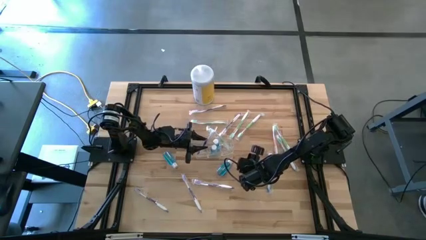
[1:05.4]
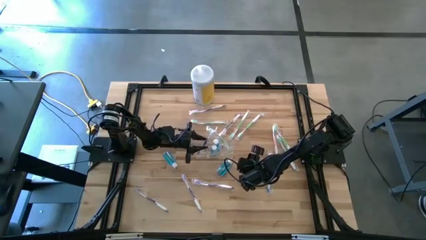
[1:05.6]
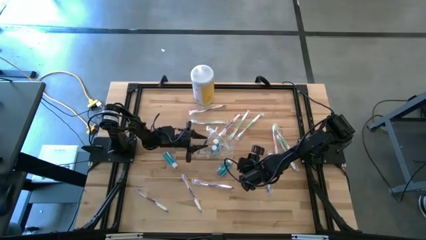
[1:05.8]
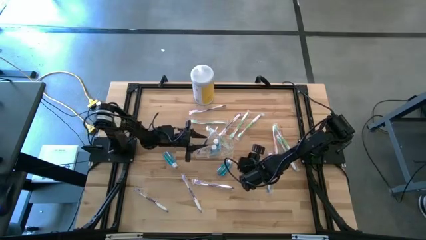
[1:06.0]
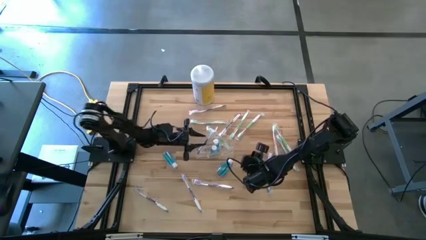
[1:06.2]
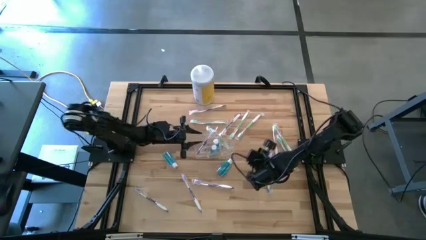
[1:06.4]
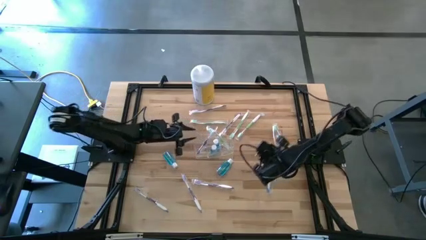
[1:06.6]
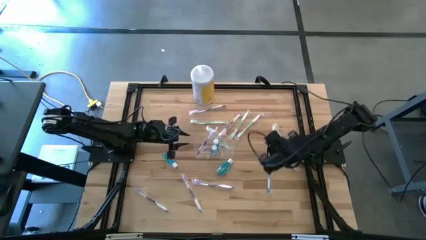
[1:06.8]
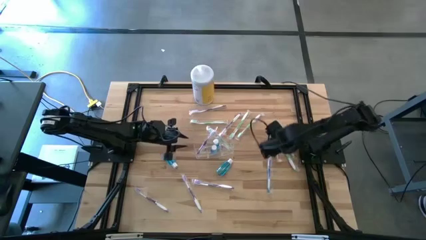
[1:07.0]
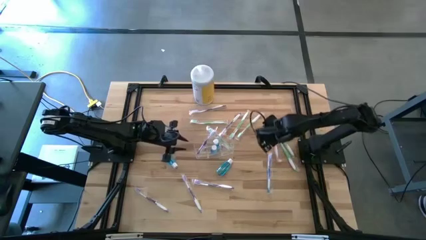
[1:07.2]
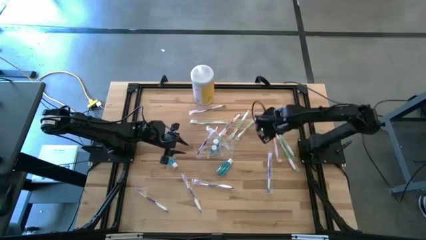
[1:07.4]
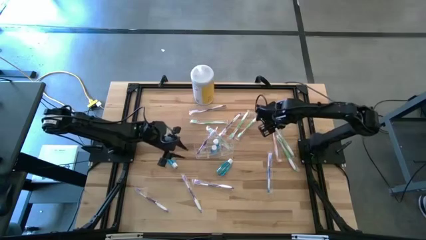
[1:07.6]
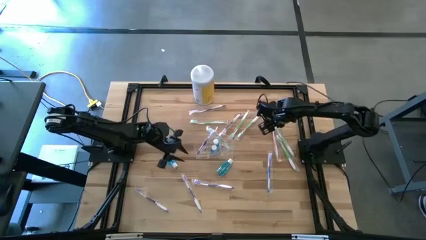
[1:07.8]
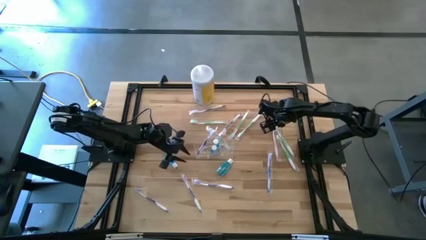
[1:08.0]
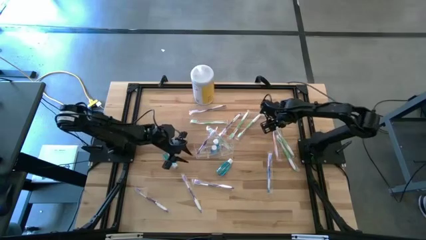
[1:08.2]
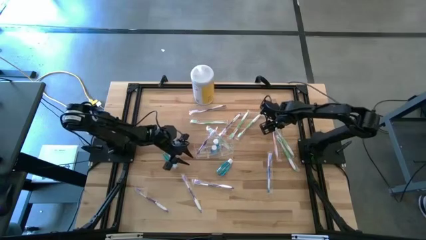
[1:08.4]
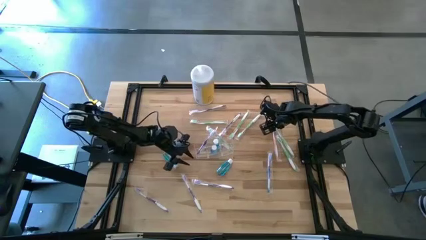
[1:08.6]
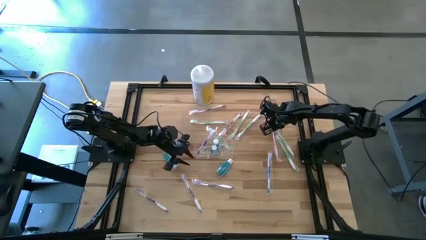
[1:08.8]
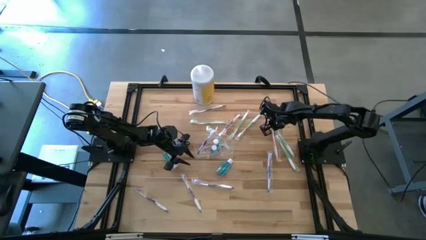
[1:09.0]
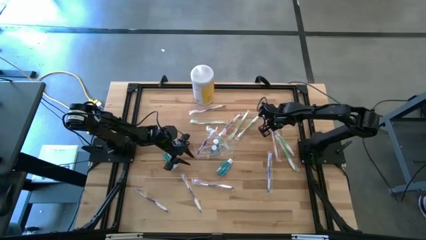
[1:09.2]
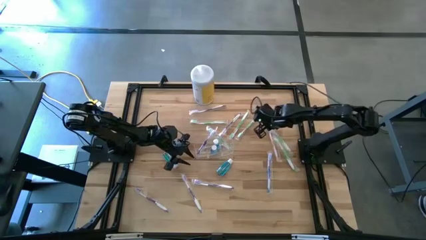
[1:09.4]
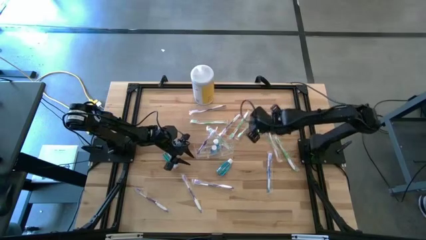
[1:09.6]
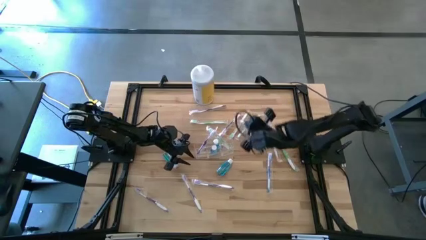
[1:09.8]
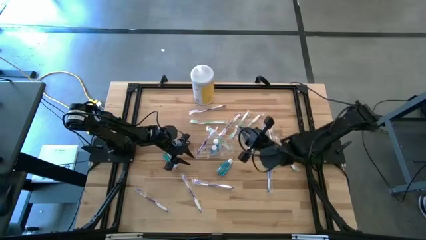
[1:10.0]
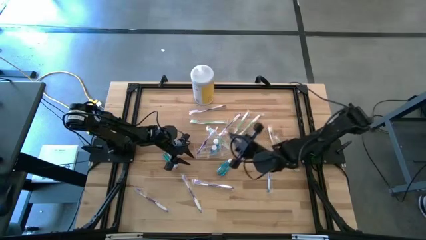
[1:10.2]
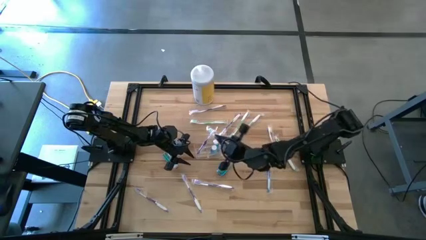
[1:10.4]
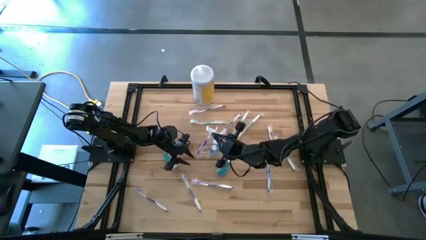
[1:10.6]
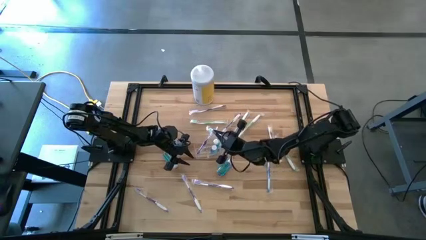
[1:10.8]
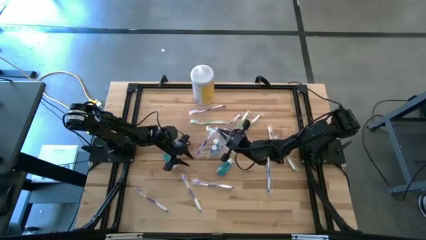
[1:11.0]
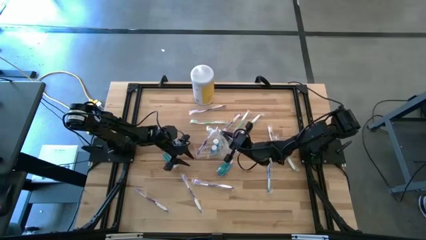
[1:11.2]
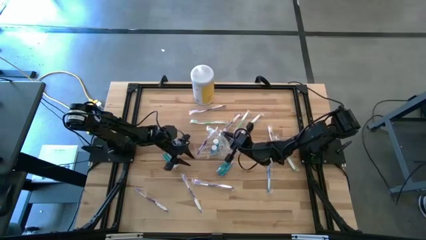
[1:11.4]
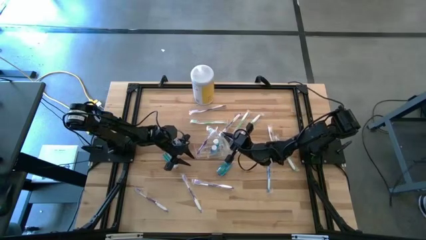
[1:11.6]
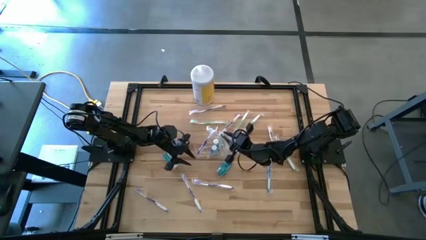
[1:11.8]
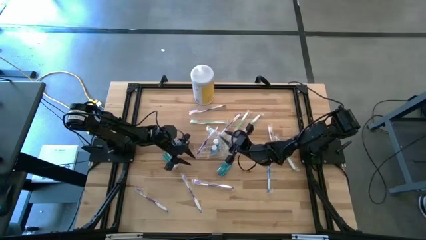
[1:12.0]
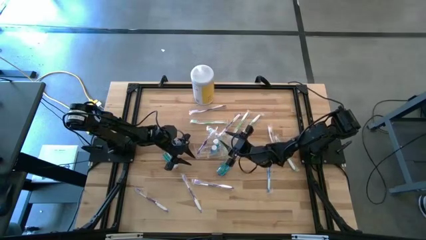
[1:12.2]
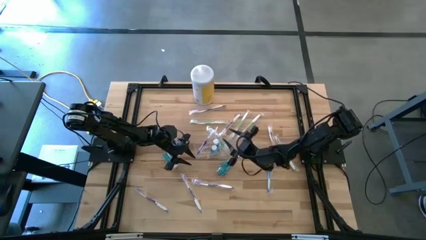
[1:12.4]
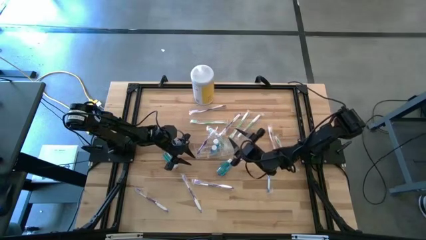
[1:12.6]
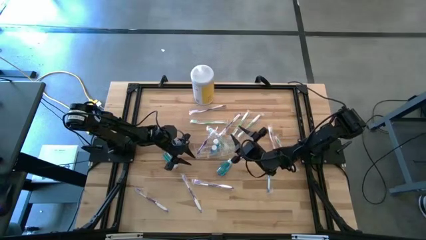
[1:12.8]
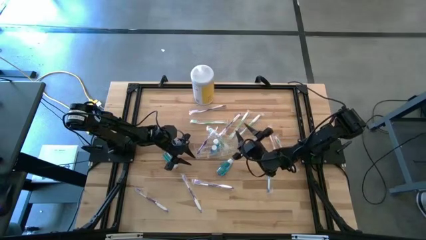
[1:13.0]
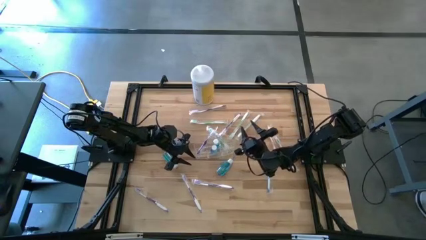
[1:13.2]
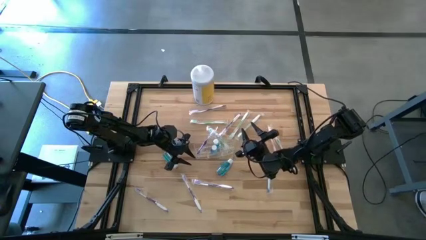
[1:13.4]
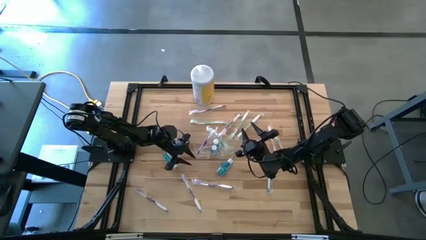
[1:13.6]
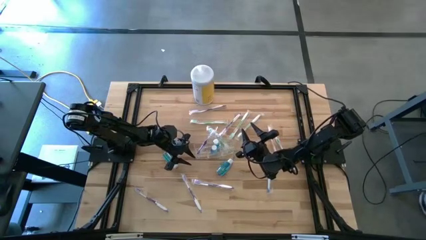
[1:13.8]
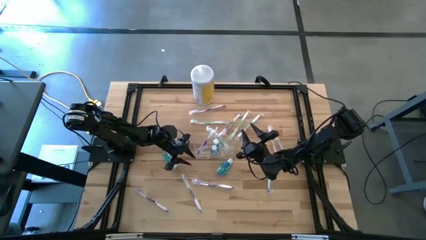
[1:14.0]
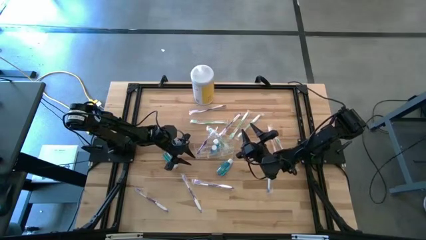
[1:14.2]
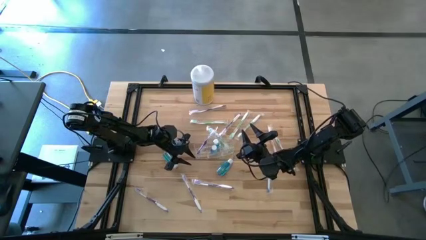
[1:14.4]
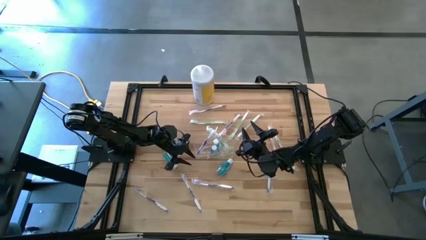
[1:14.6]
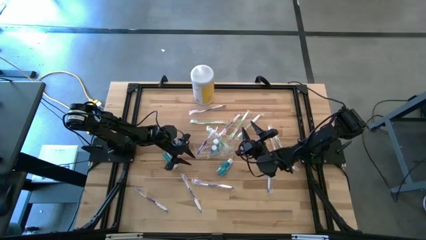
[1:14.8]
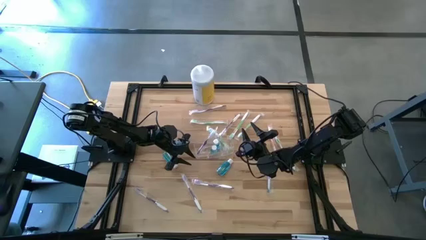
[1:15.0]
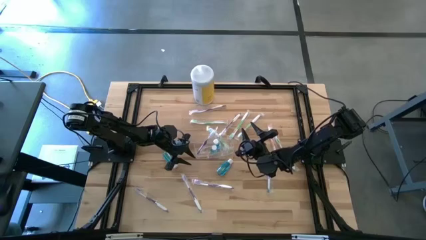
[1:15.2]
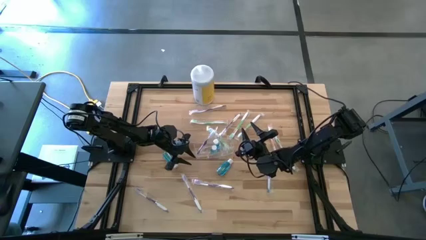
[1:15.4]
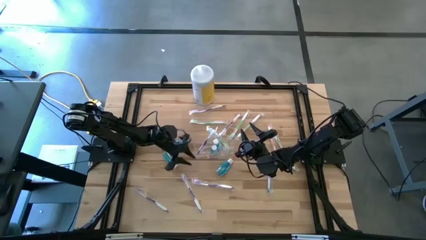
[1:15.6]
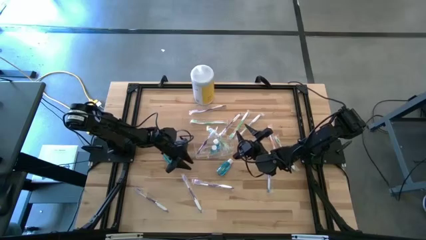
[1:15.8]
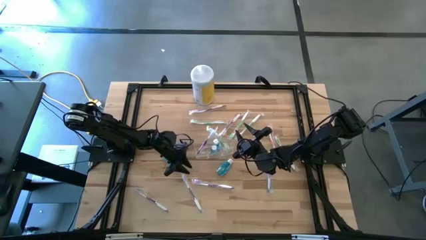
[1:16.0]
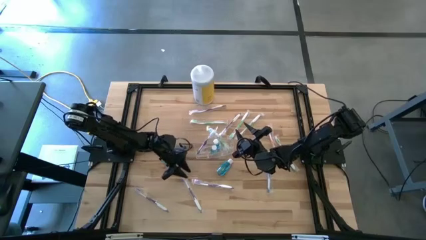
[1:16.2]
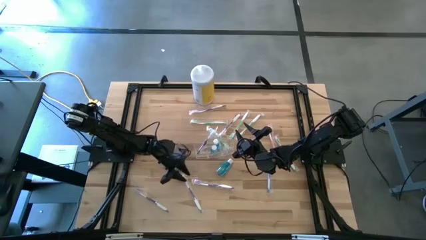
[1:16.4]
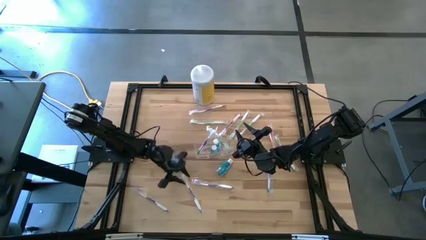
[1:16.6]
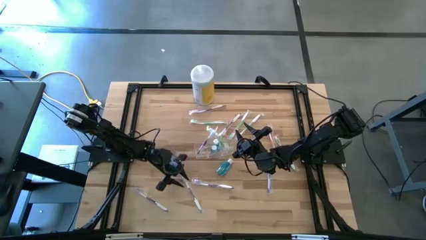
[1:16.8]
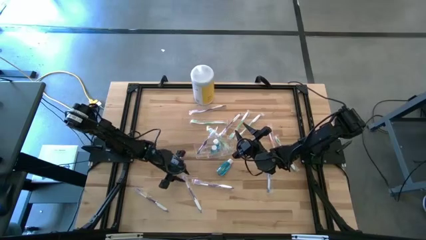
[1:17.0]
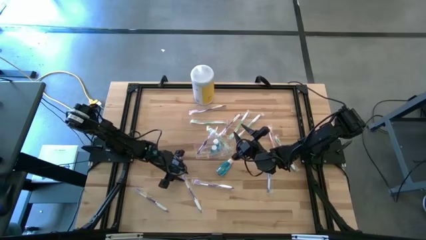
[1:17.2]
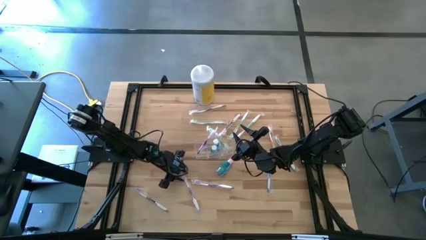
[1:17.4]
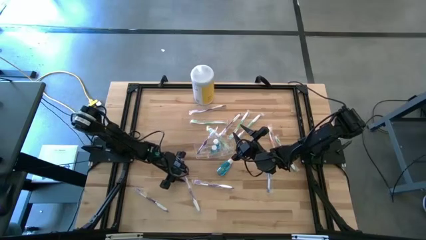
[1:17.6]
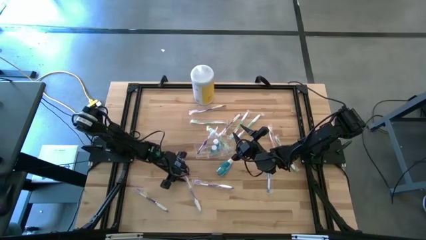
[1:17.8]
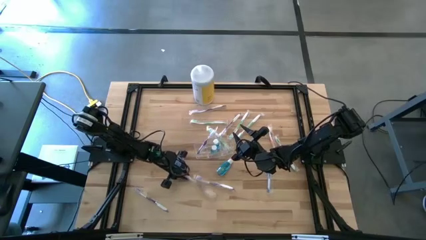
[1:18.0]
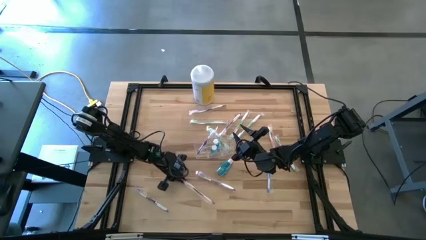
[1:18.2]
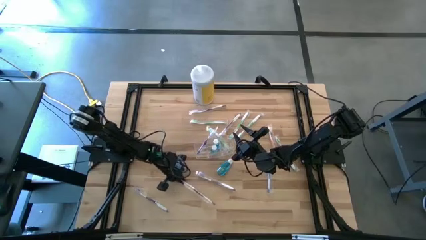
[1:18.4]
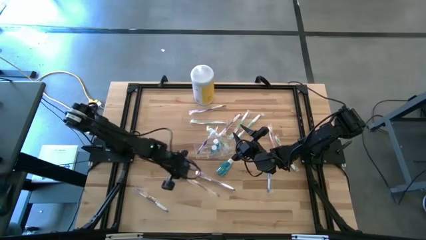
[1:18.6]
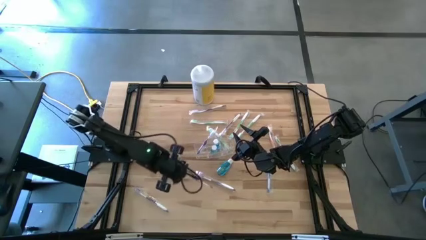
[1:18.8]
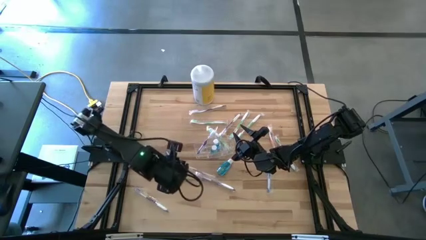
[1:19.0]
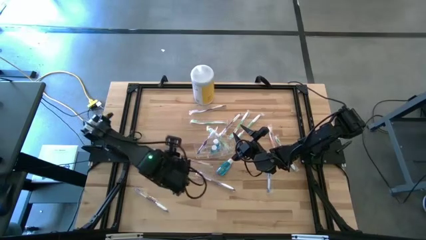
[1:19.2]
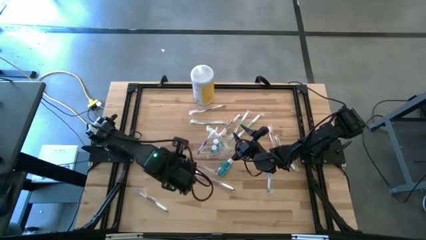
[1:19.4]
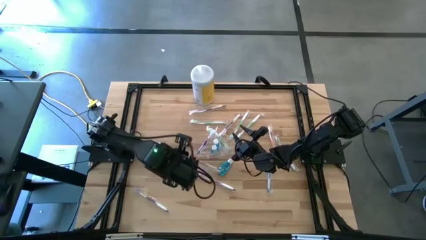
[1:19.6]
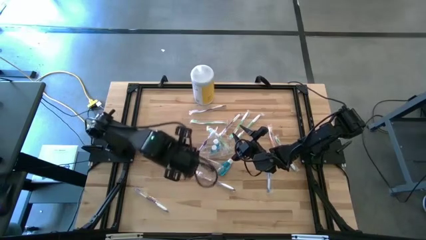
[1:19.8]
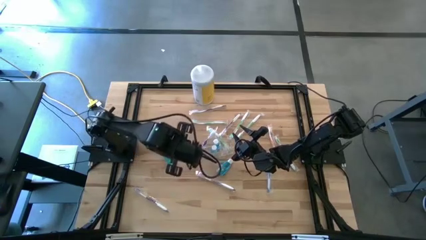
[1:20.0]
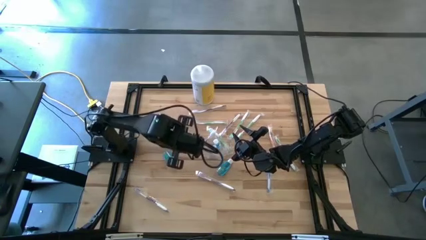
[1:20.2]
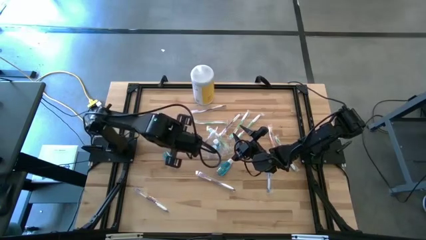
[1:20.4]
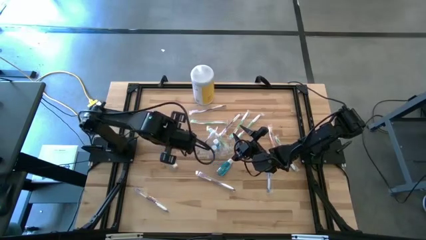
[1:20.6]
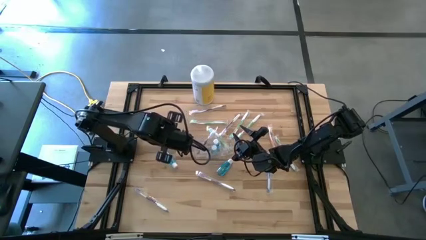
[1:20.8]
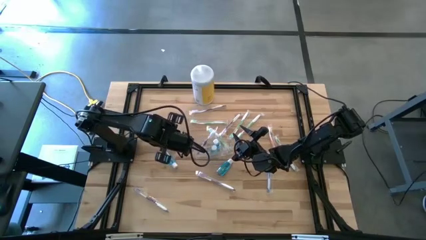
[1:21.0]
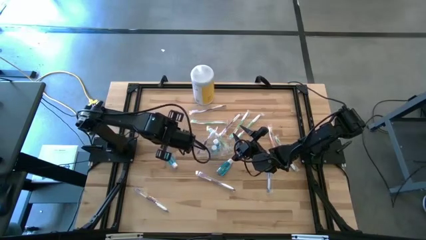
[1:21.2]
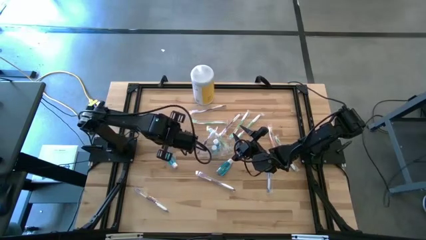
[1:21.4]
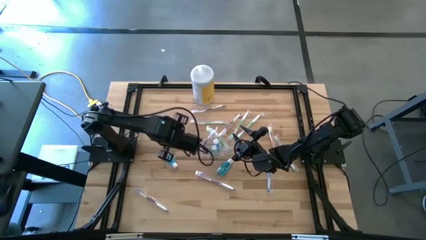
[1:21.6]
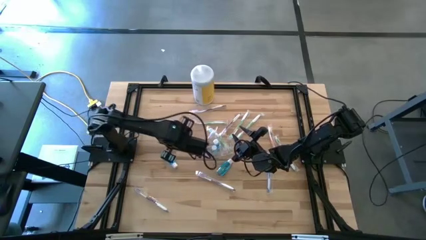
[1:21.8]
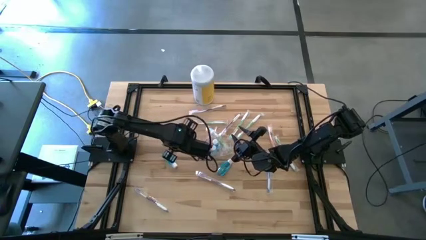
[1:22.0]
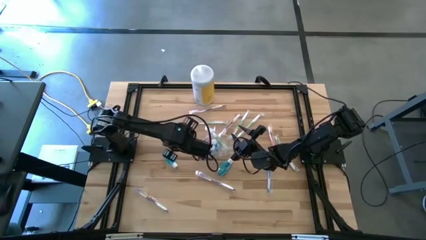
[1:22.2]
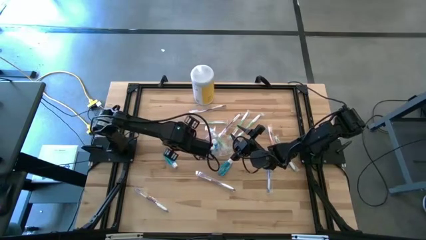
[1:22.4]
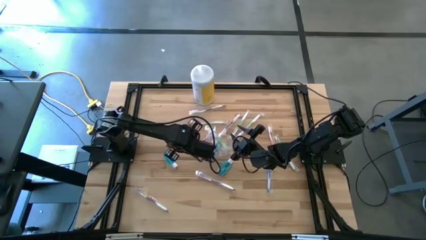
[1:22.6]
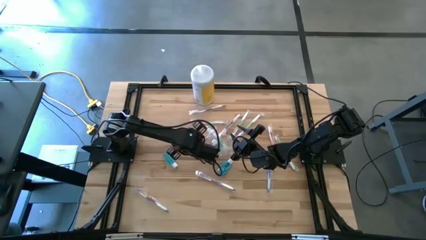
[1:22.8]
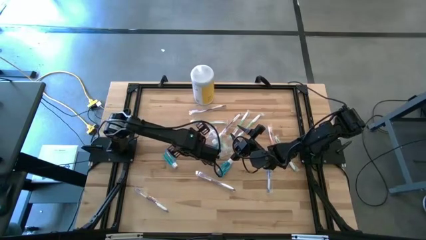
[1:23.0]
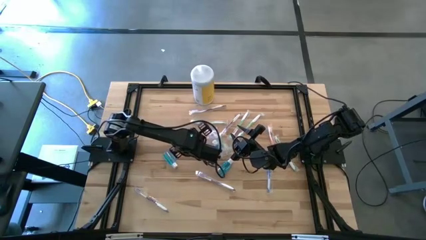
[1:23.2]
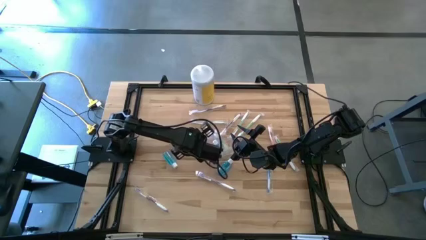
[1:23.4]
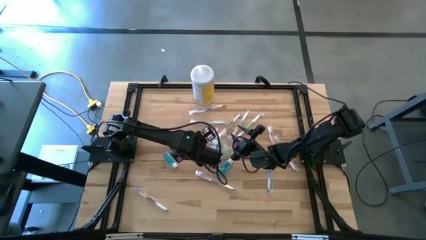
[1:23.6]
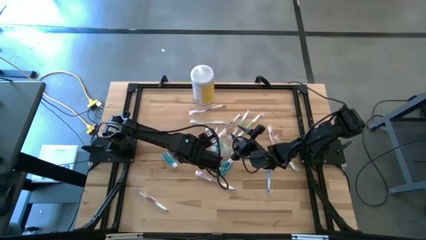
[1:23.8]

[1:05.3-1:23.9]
Task: Pick & Place toothbrushing station
Put the violet toothbrush into the transparent organizer
